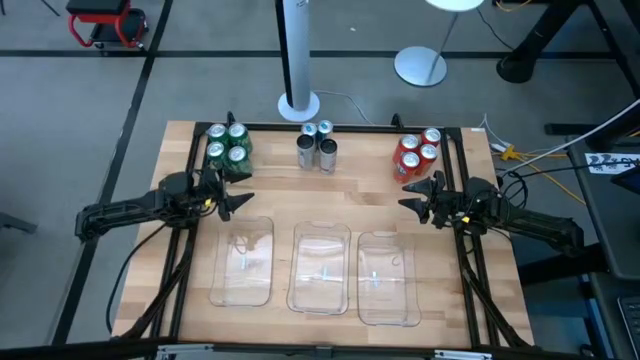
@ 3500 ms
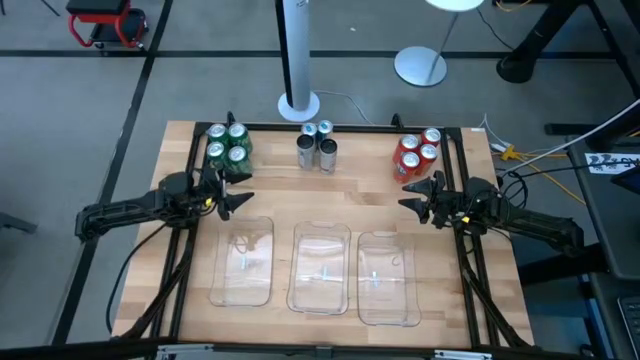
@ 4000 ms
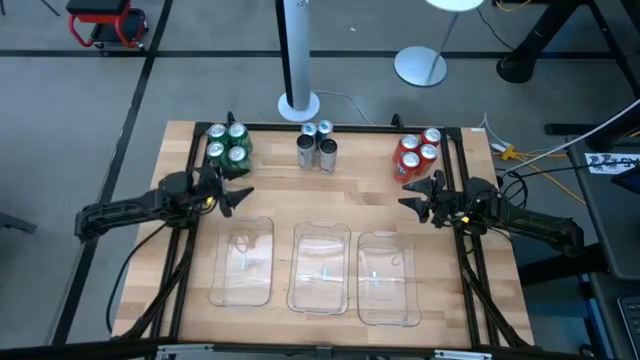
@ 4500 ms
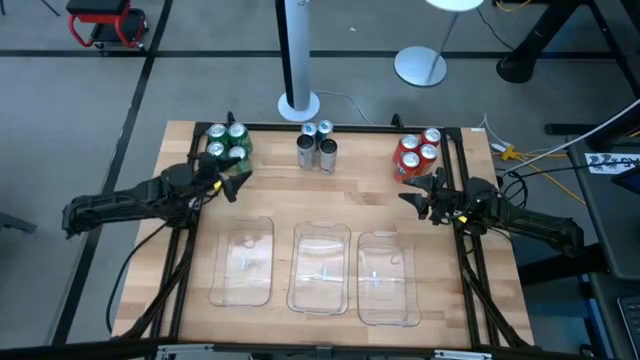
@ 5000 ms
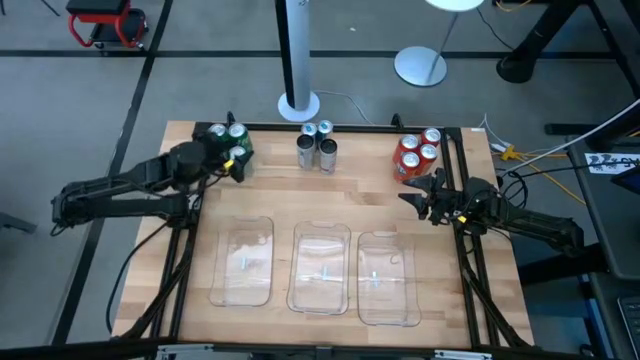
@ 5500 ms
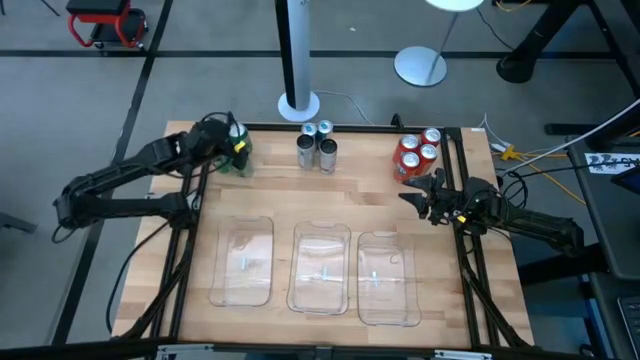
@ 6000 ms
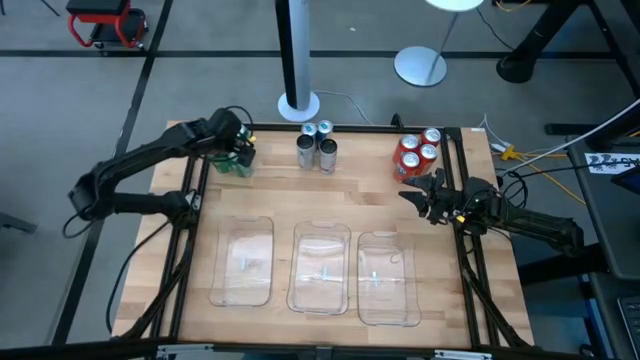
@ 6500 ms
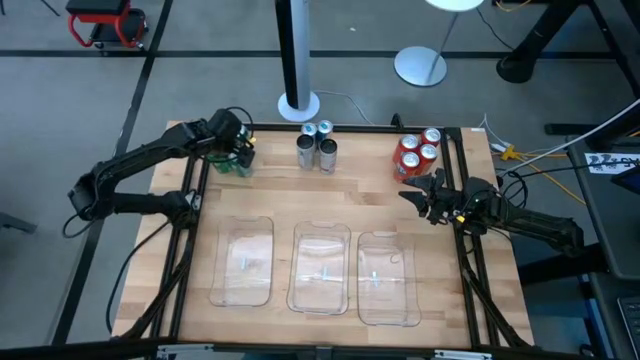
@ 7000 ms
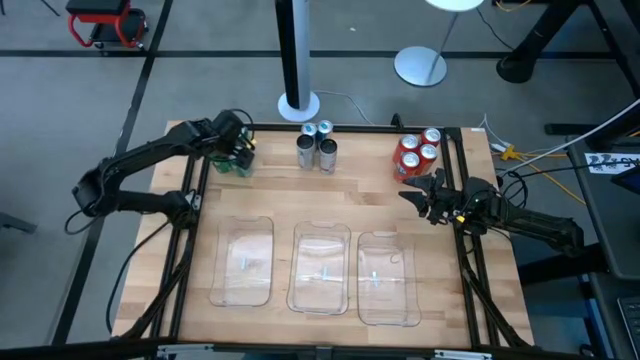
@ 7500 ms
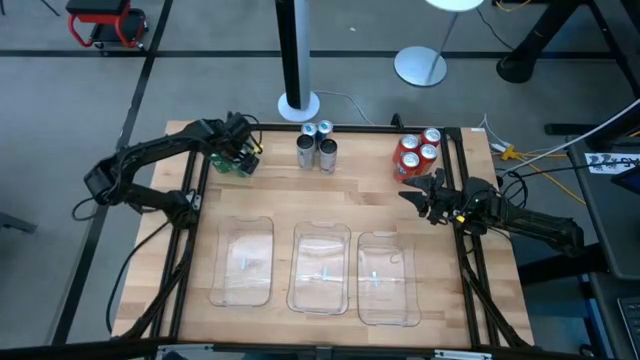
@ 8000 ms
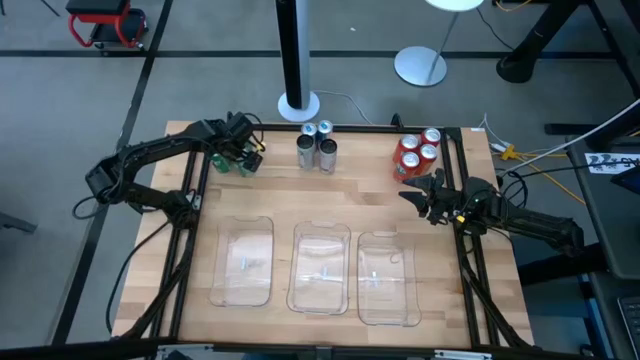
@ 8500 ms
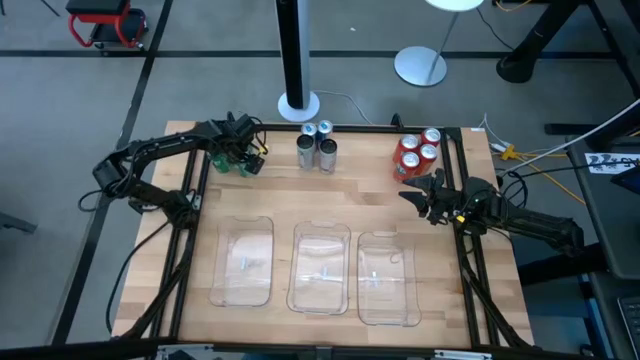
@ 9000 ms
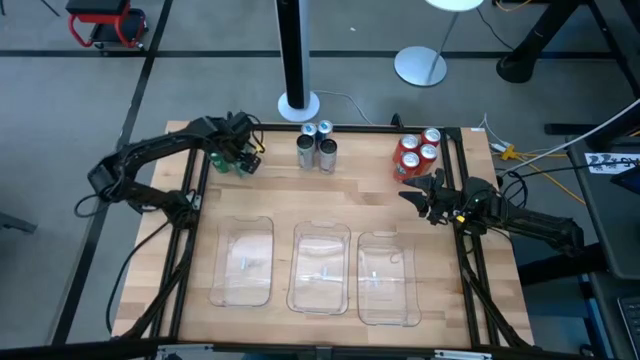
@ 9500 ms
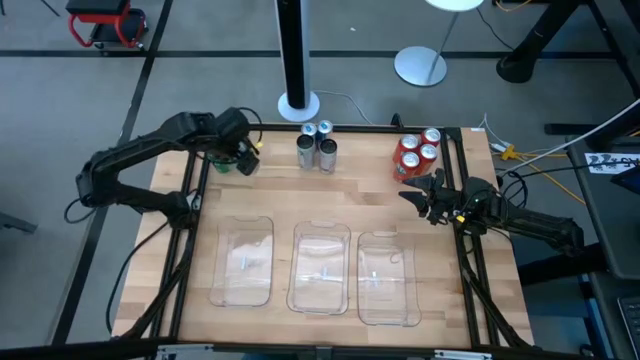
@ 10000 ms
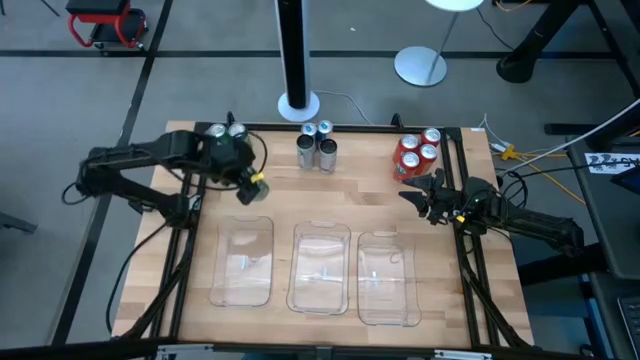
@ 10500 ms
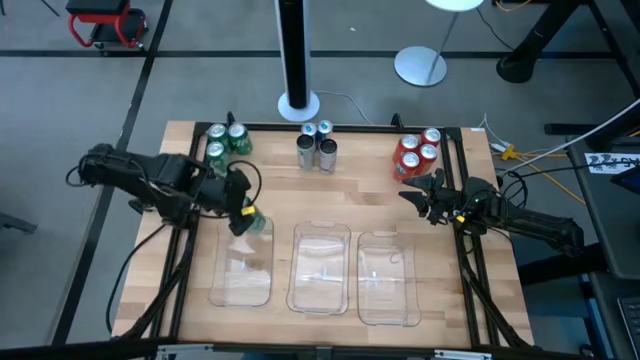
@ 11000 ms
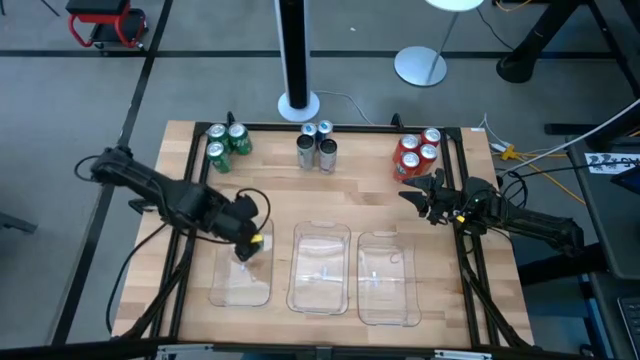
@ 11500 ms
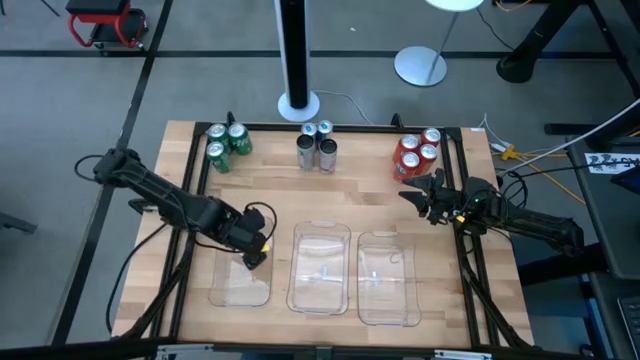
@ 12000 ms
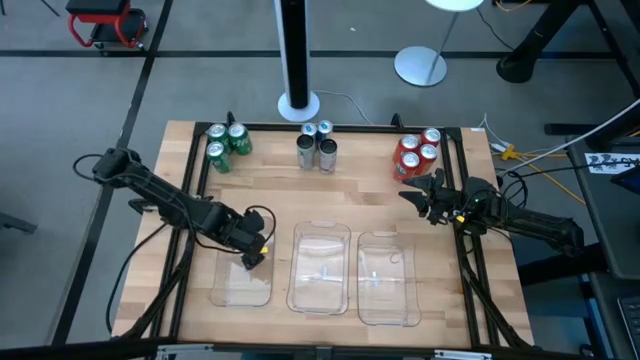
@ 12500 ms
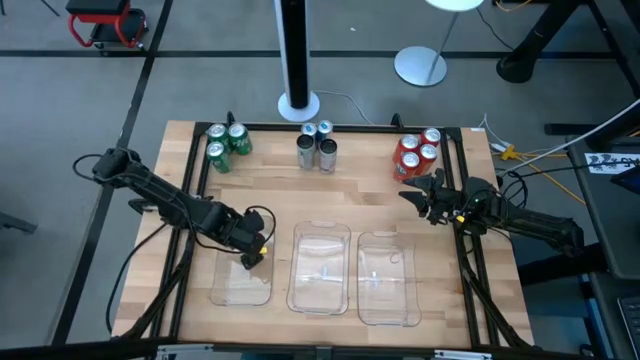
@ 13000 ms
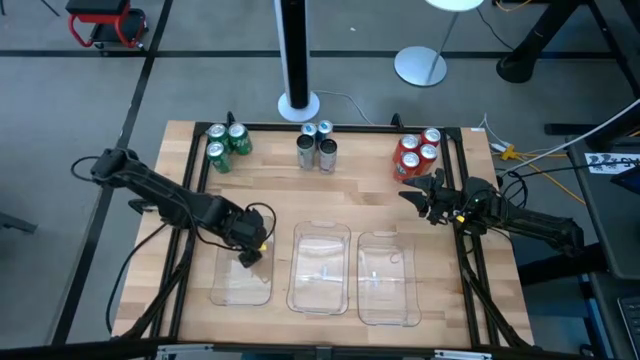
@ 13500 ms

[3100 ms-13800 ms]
Task: Sort soda cans
Put the bottom right green soda can into the left transparent bin

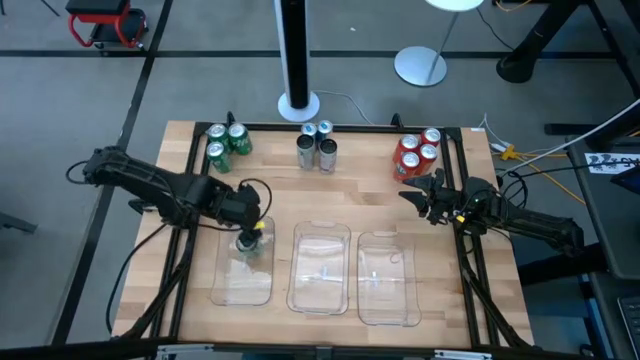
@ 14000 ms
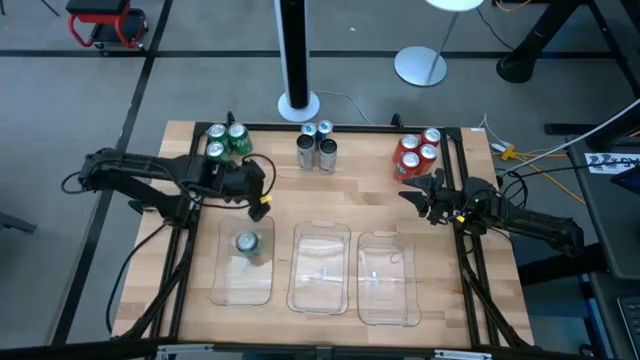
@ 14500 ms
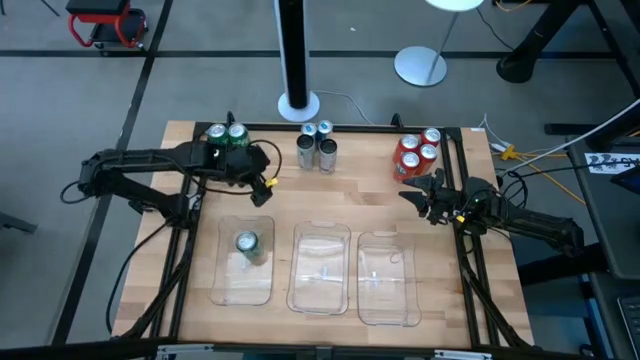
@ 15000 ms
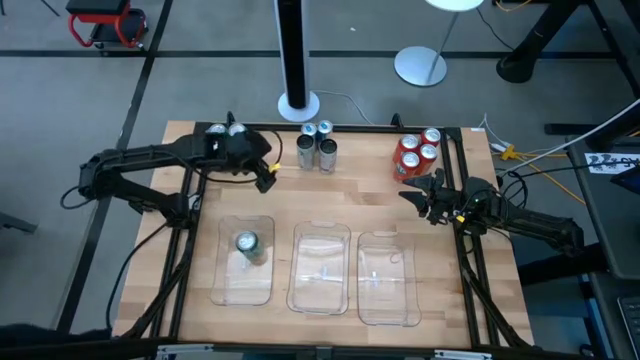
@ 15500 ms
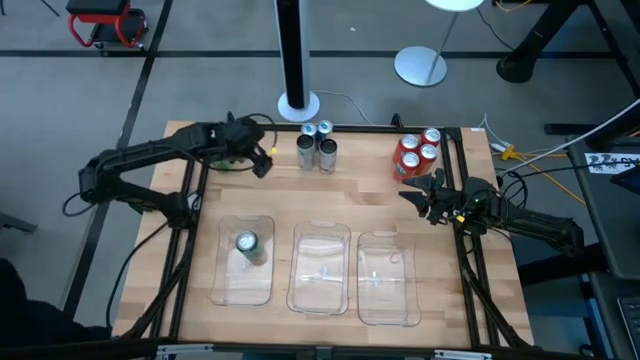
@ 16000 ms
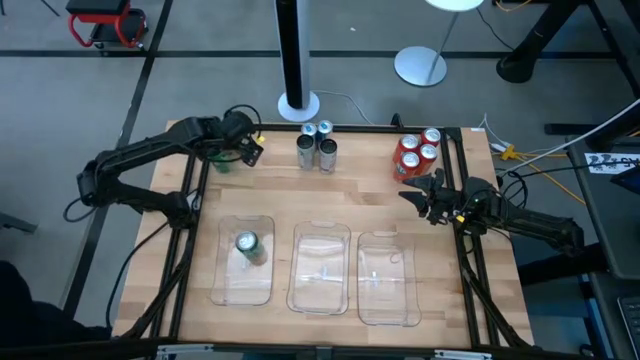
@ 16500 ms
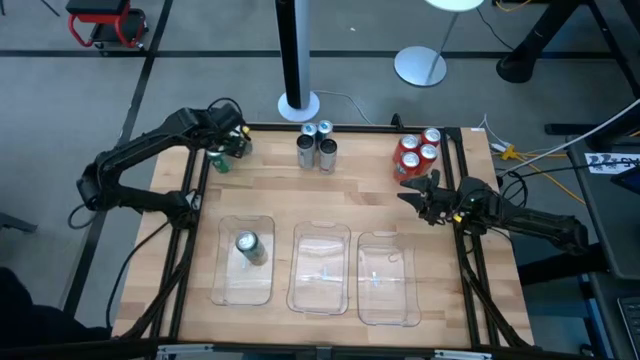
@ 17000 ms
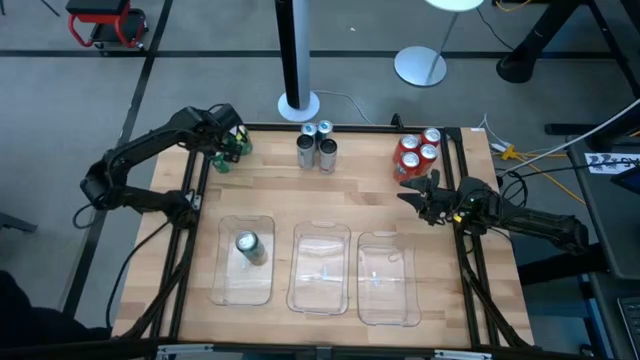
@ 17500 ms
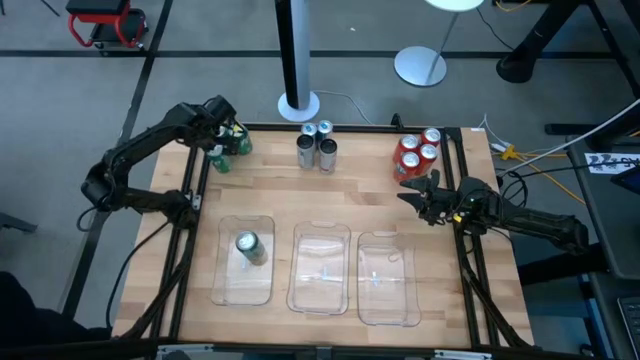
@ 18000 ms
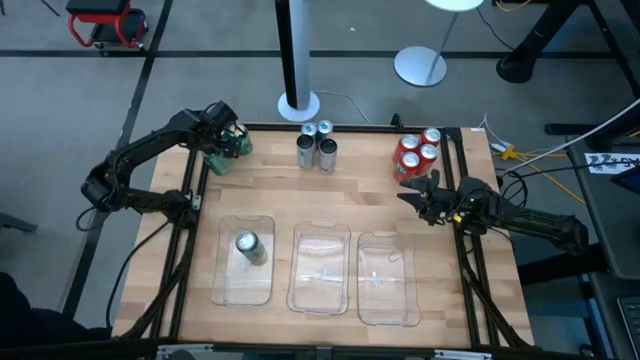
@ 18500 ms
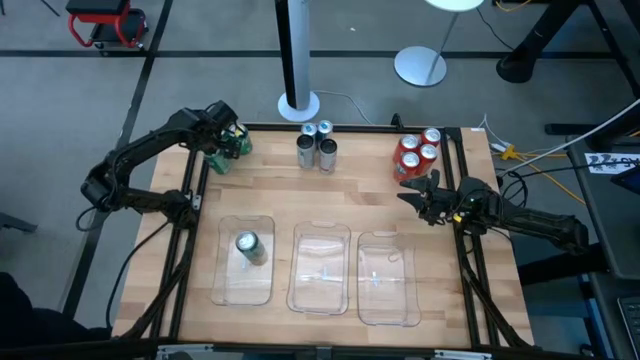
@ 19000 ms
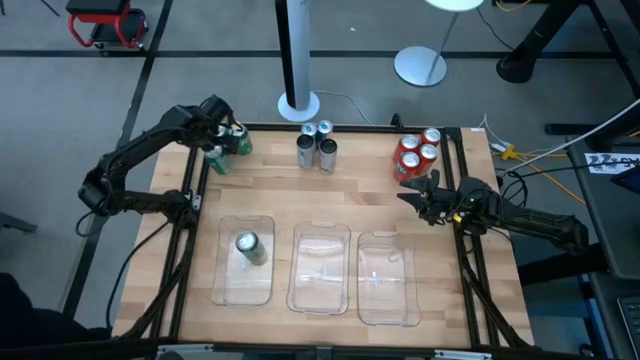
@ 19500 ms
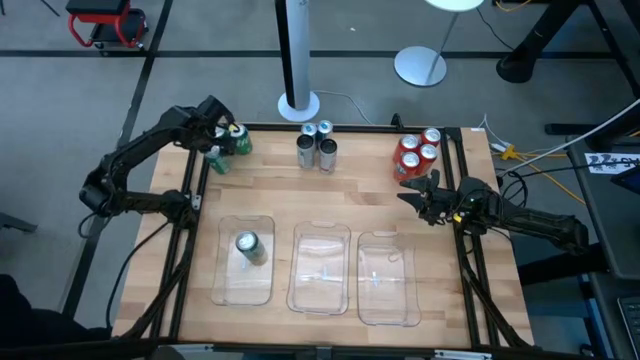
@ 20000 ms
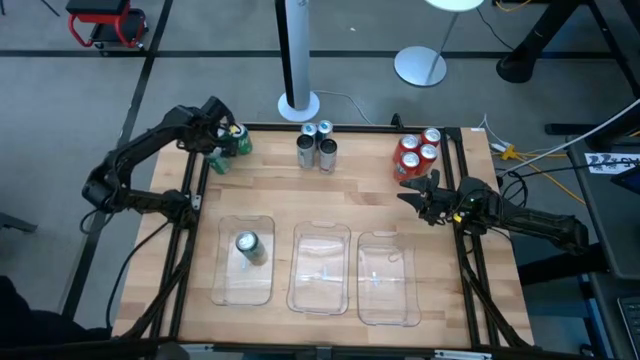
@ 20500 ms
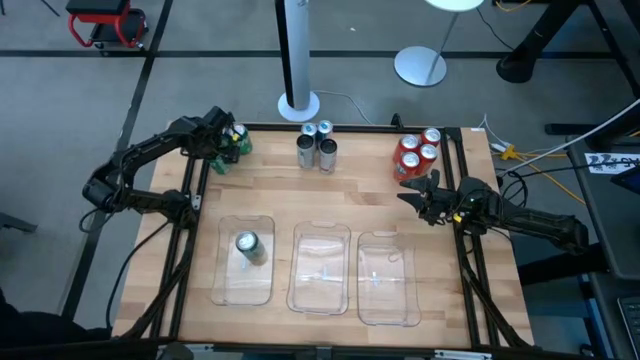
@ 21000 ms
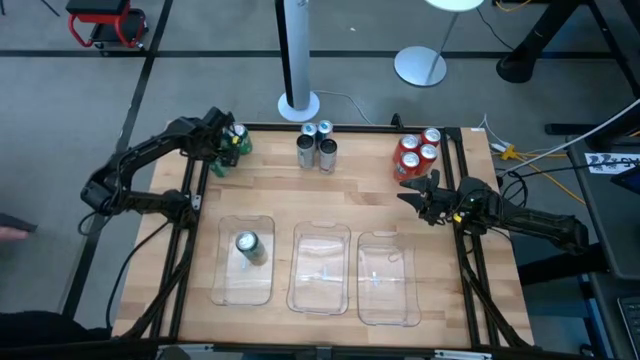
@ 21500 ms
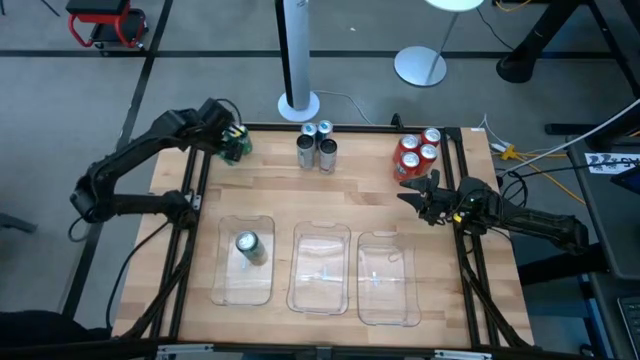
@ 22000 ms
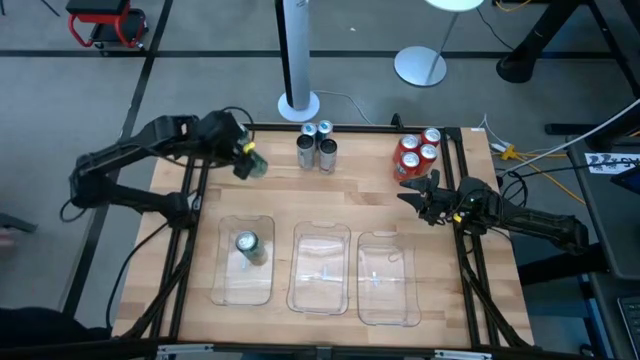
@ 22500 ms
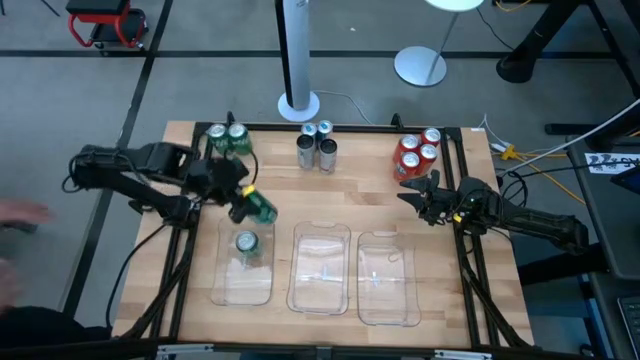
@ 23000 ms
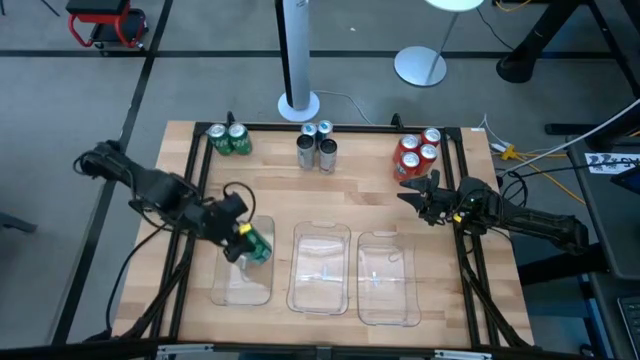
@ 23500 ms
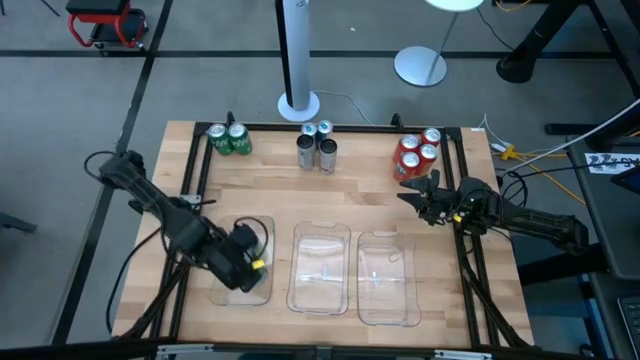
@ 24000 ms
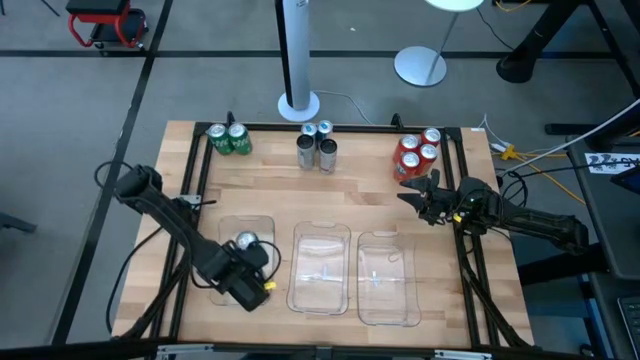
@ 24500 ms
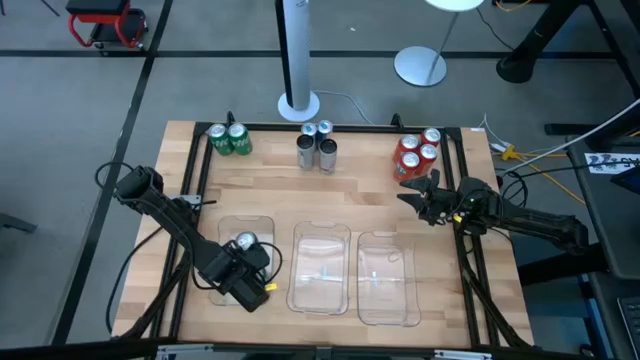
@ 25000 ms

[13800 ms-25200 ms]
Put the bottom left green soda can into the left transparent bin
